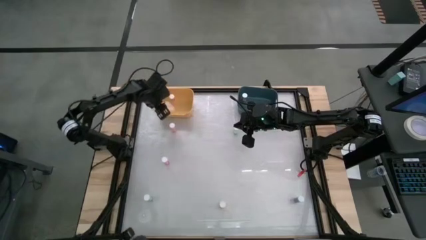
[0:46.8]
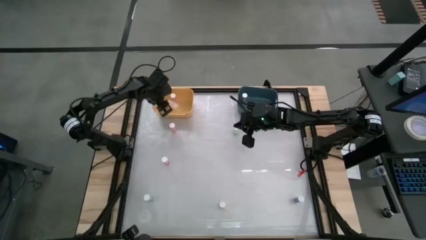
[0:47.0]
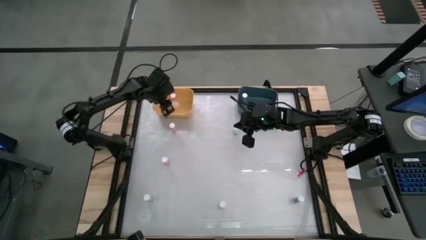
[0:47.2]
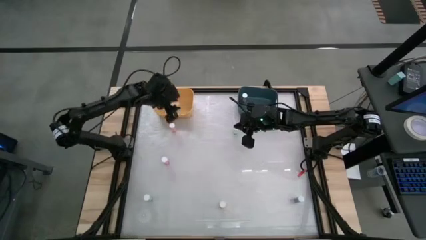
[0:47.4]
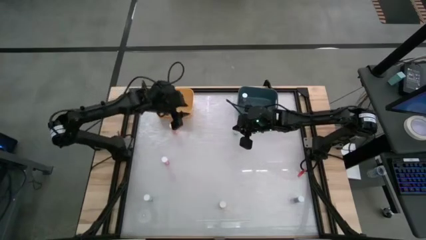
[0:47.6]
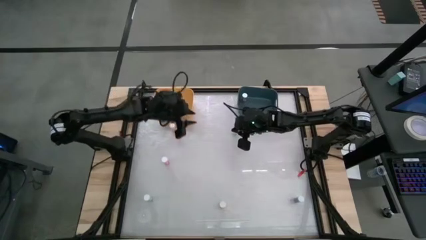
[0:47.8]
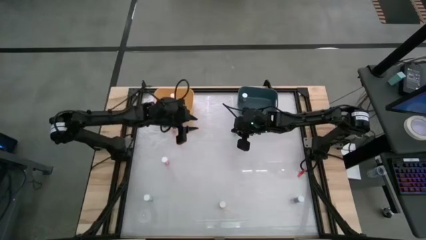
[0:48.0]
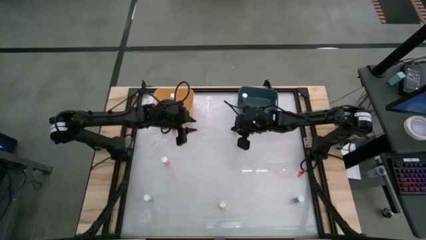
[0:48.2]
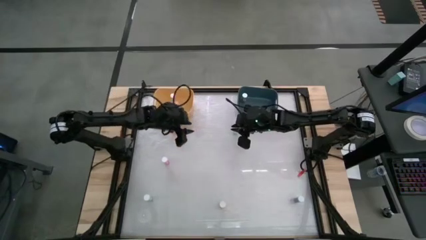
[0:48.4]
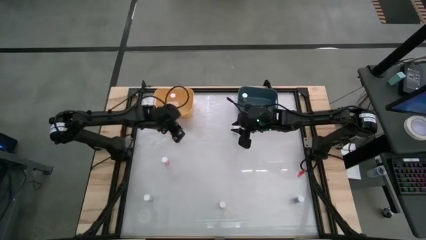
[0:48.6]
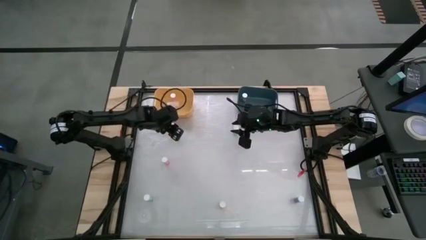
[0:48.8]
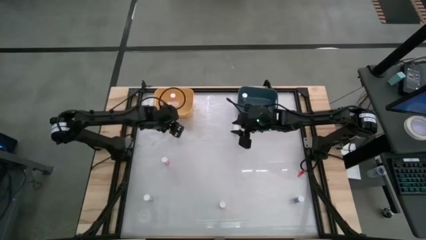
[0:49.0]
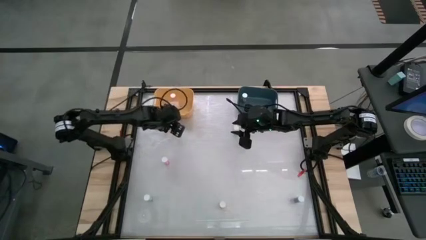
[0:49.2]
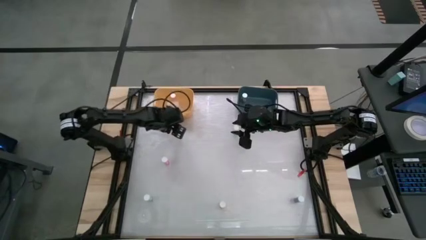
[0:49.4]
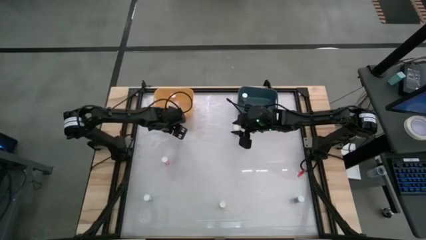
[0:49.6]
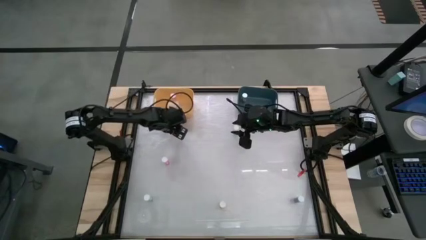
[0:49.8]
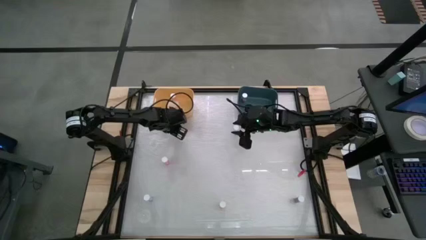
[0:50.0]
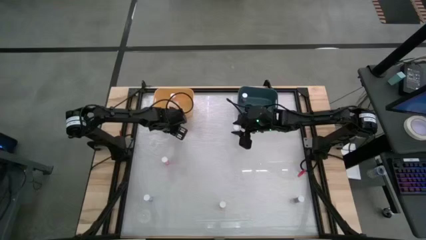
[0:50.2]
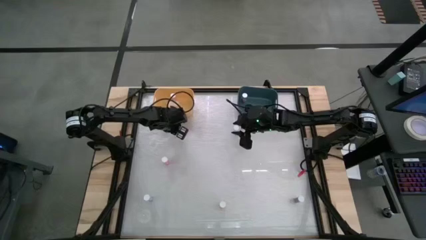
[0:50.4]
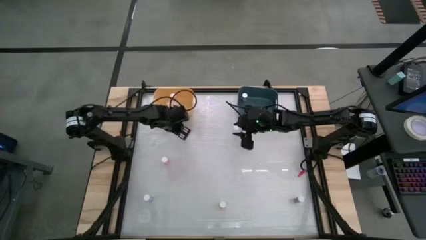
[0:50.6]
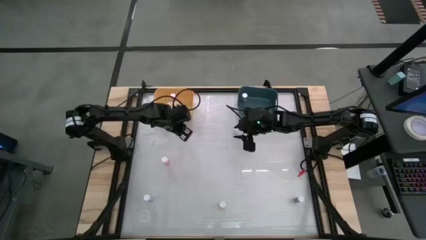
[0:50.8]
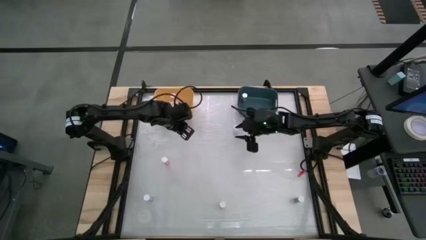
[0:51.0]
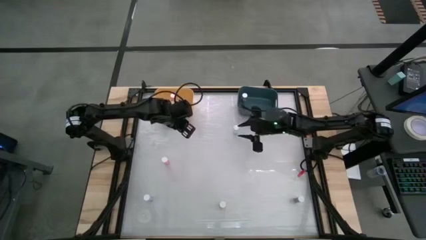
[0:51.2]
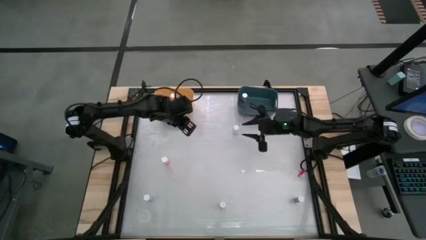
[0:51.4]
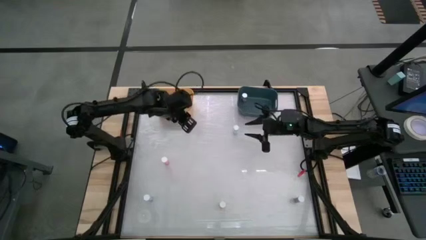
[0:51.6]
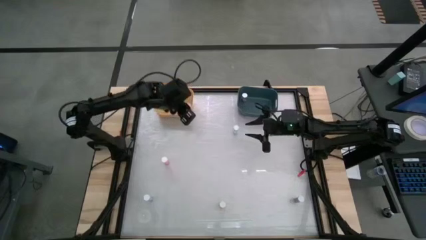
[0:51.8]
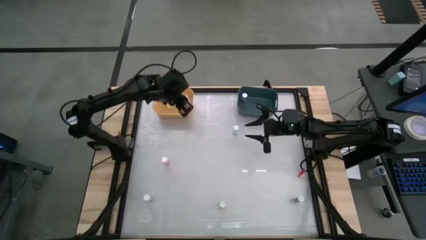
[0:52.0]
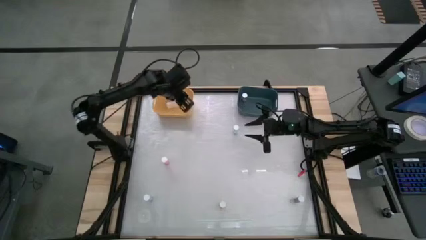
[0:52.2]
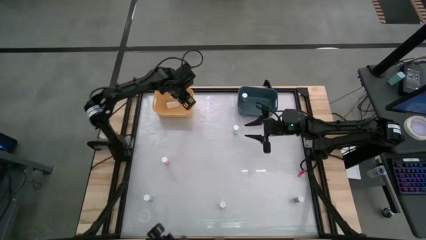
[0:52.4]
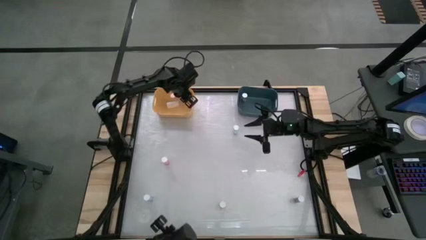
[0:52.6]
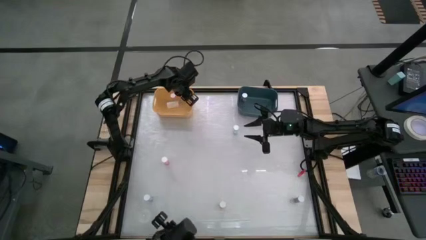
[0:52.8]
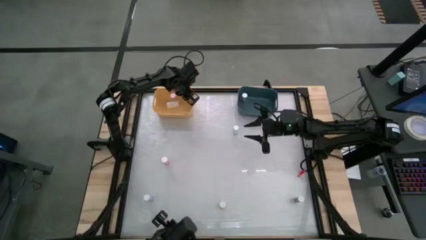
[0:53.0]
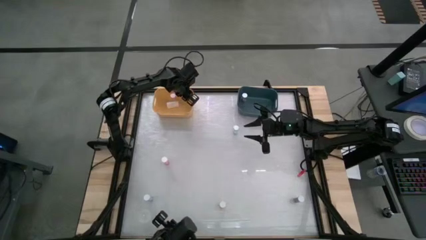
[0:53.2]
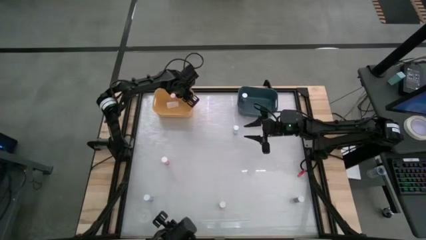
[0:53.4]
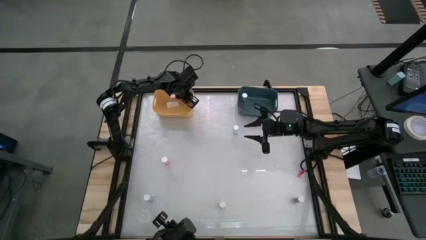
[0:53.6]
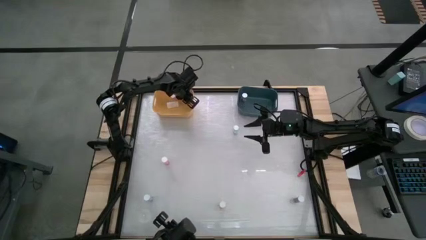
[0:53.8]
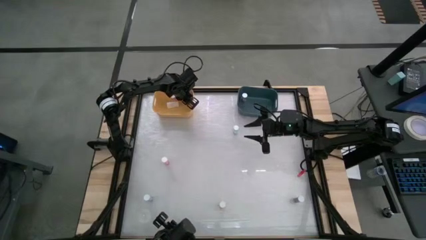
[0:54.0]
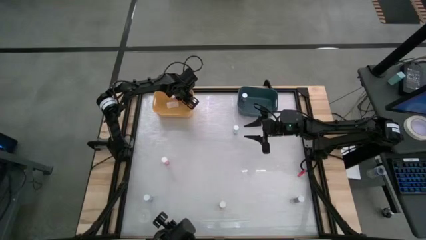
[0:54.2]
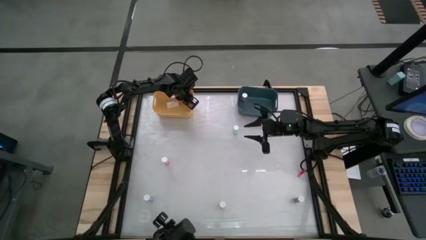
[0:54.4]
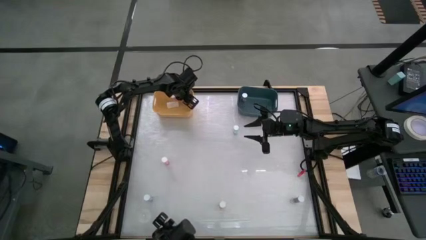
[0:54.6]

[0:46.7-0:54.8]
Task: Pick and place medicine bottles into bin by pill shape (circle, oval)
Put the top pink tablet bottle into the yellow bin

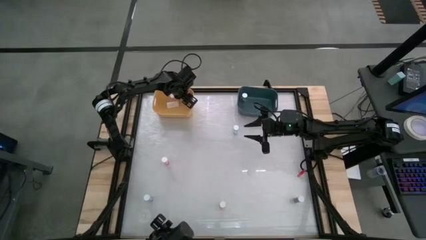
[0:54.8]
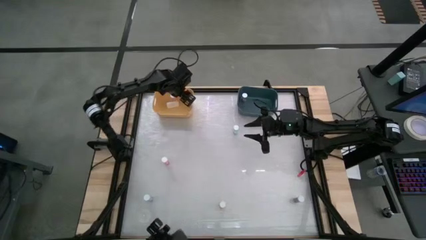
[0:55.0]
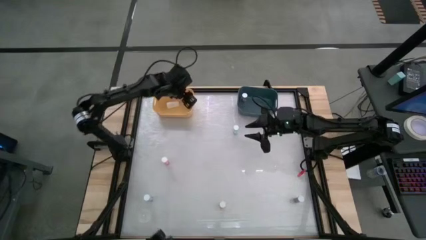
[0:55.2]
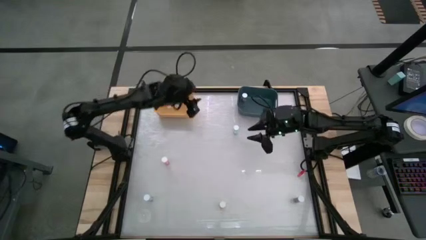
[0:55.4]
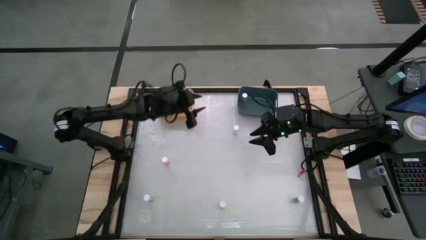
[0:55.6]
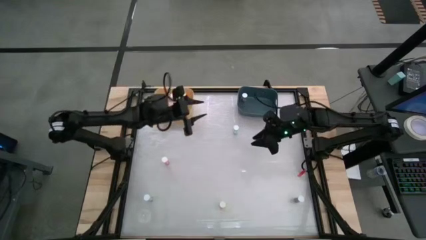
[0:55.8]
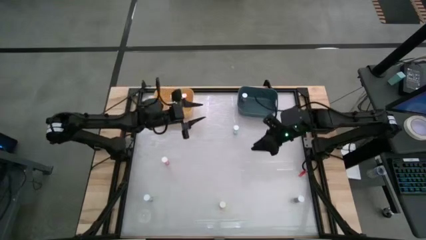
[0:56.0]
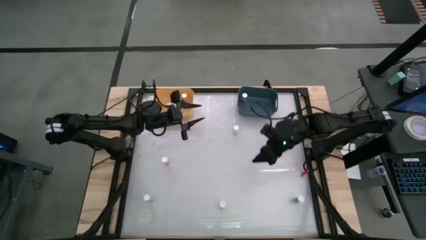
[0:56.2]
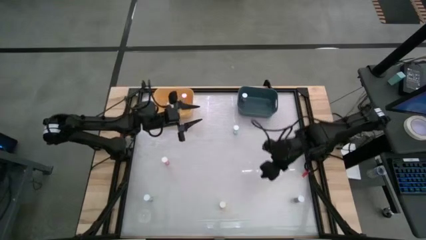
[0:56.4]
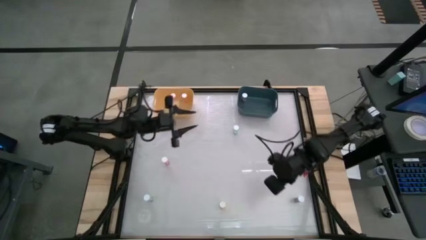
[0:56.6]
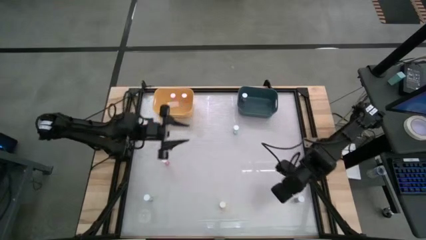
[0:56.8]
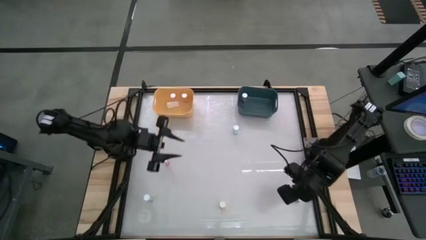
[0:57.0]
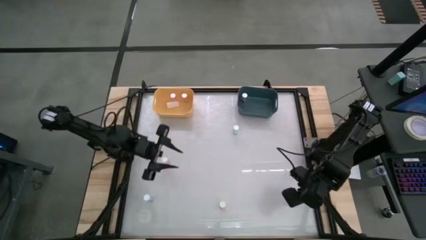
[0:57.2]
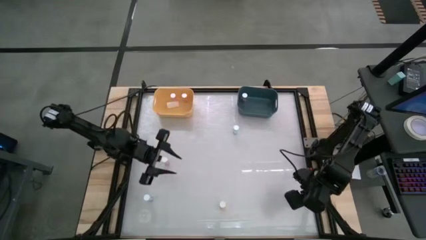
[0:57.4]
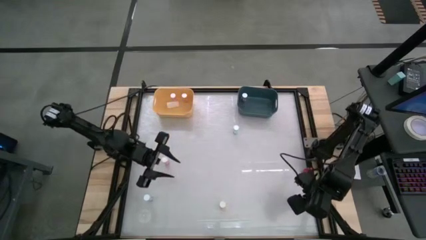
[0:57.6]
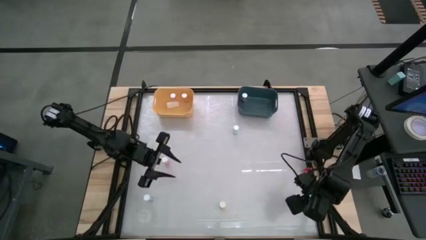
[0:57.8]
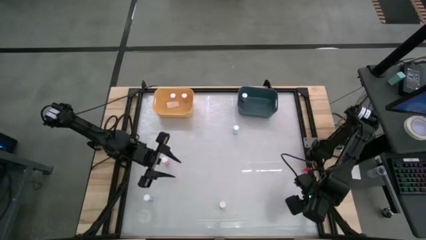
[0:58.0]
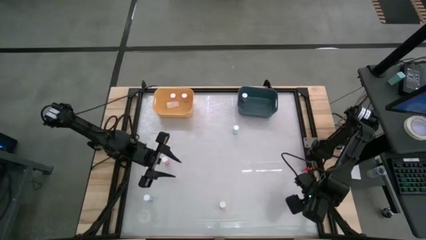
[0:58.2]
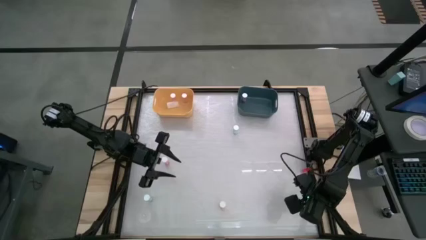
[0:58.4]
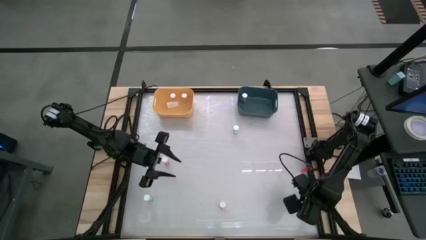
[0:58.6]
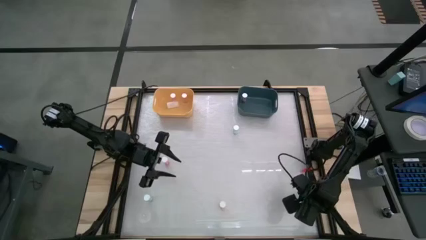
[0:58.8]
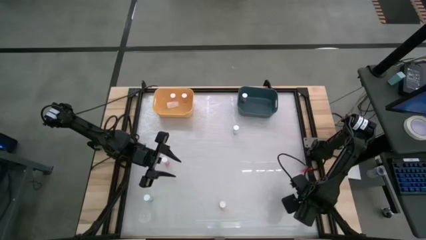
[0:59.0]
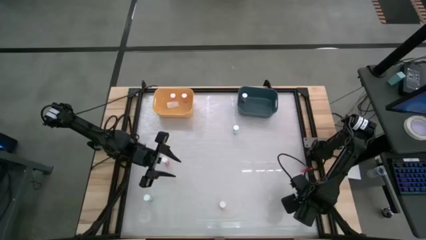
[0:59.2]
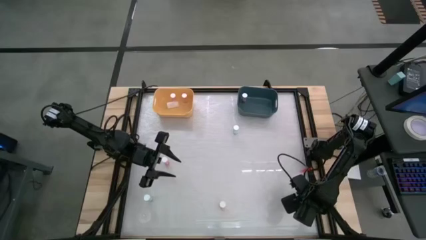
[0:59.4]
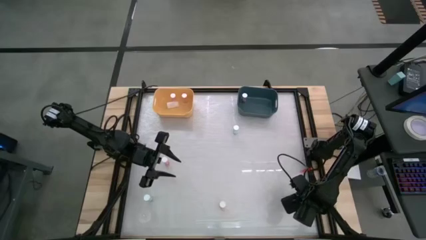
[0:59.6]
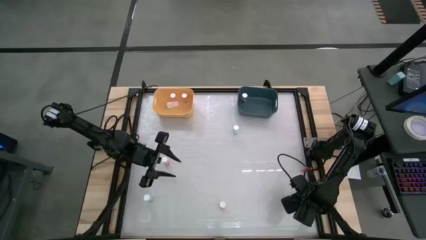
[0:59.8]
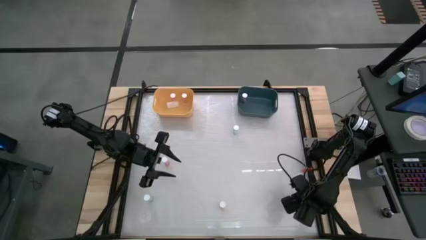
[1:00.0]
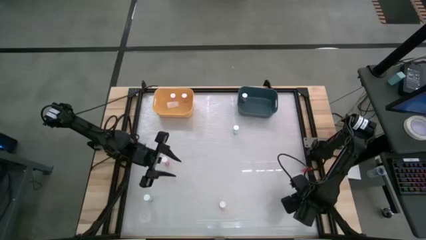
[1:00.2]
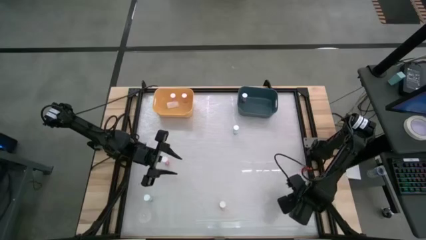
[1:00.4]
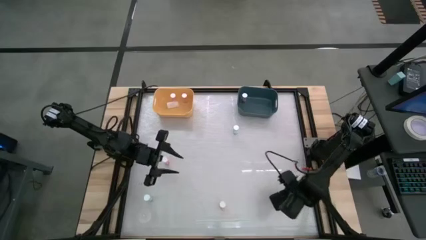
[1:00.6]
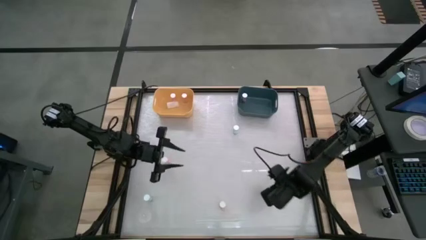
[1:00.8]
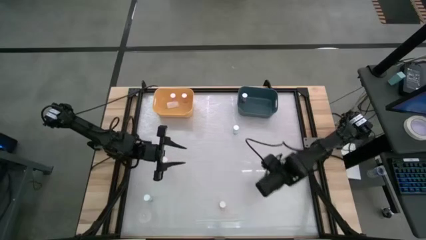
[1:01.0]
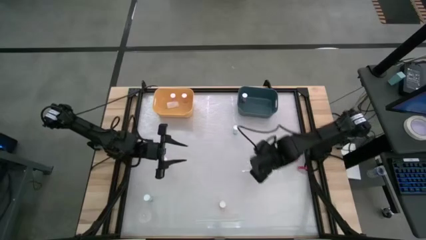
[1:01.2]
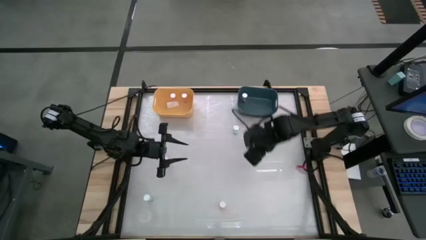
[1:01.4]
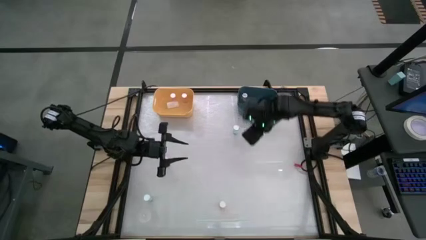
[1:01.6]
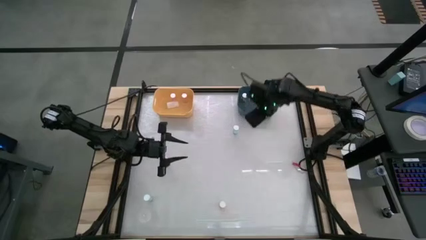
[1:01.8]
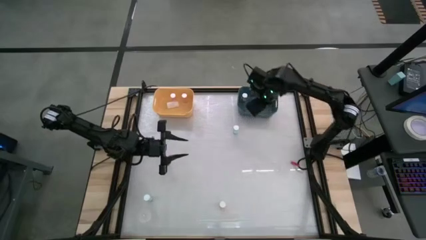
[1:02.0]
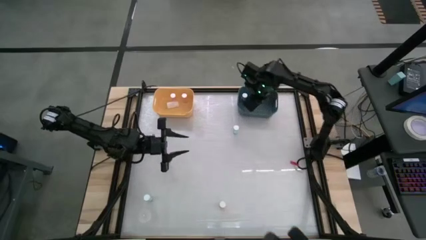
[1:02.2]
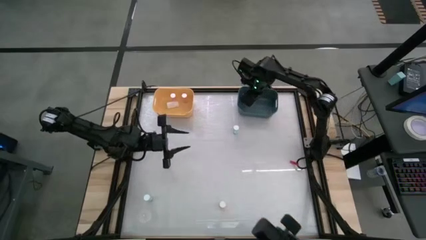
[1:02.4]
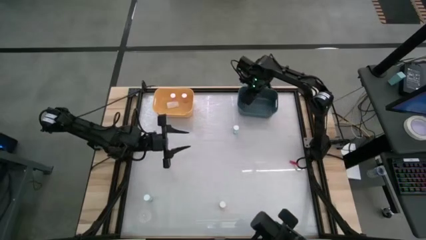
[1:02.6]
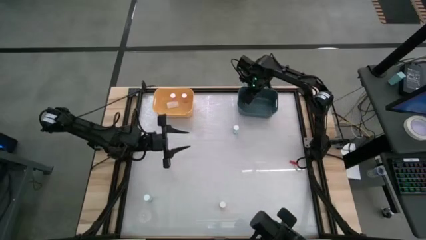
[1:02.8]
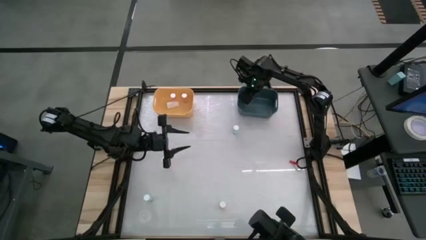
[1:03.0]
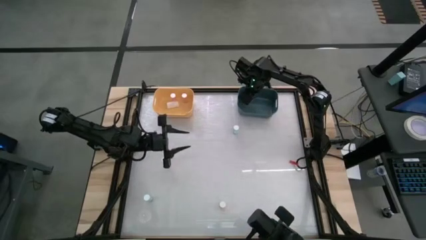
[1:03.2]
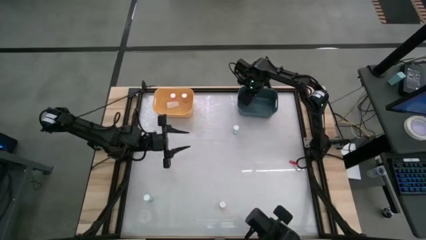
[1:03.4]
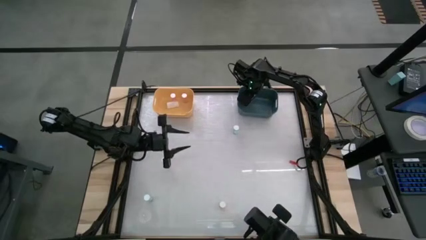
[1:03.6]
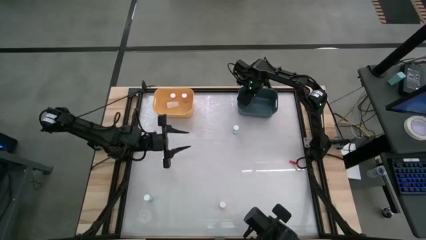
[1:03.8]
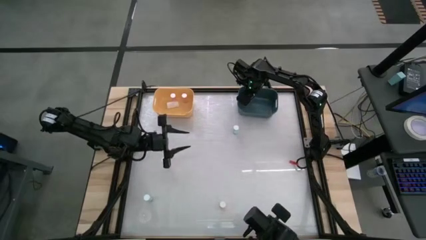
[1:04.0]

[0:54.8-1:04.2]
Put the right blue capsule bottle into the blue bin
